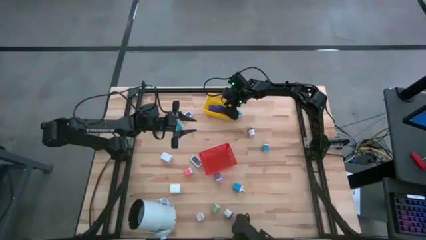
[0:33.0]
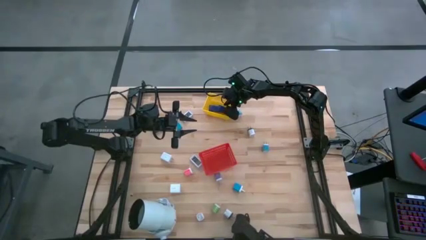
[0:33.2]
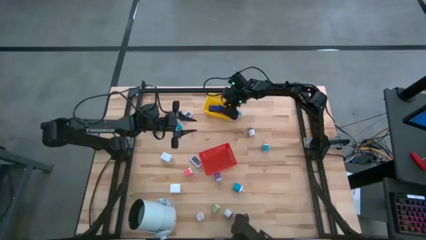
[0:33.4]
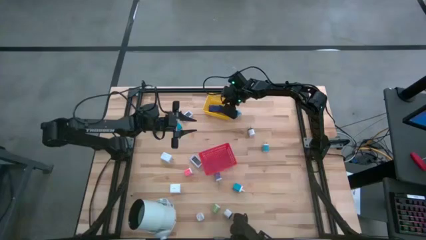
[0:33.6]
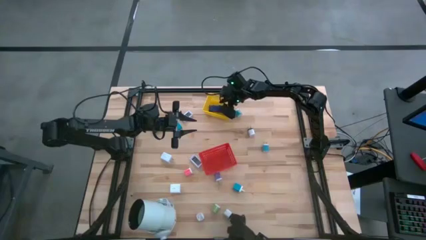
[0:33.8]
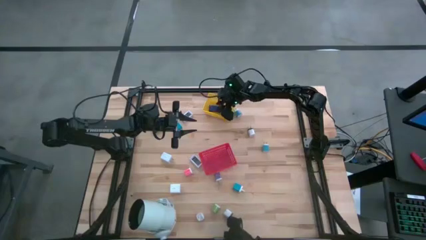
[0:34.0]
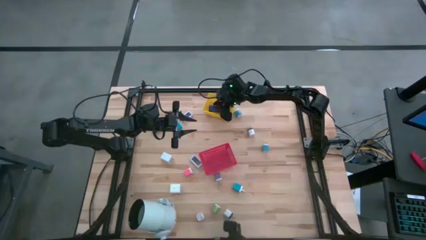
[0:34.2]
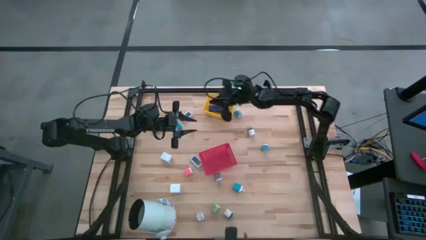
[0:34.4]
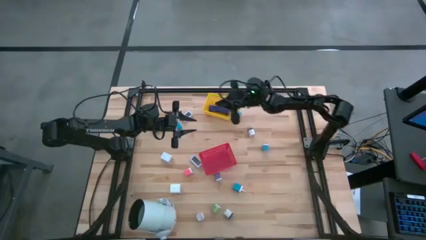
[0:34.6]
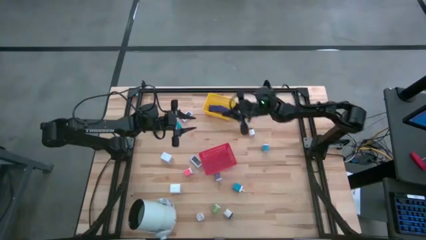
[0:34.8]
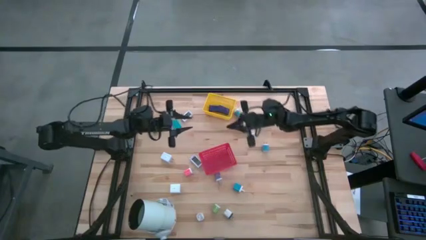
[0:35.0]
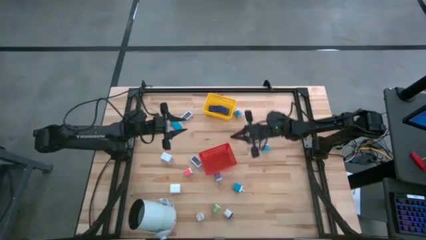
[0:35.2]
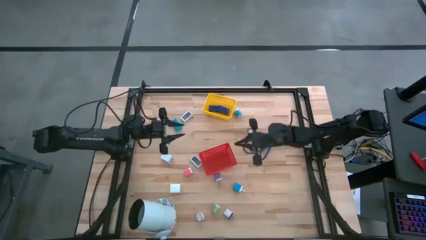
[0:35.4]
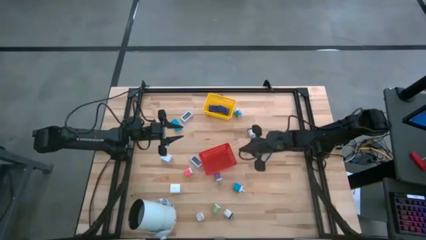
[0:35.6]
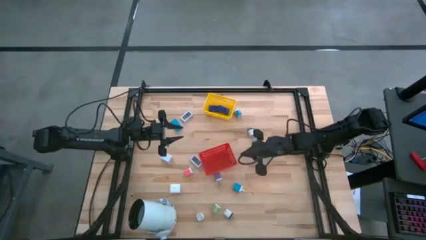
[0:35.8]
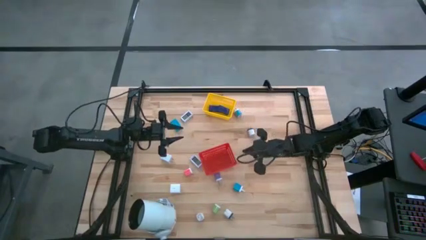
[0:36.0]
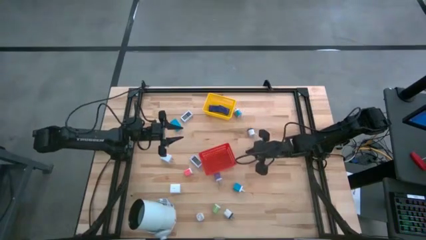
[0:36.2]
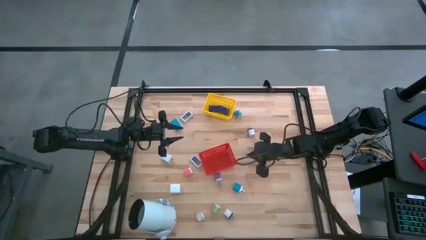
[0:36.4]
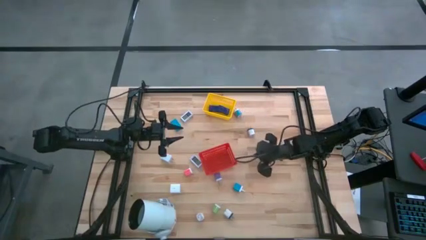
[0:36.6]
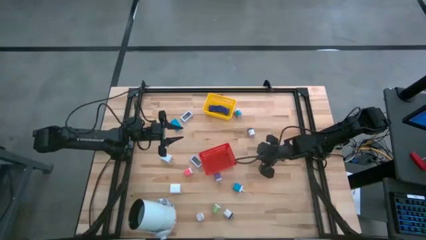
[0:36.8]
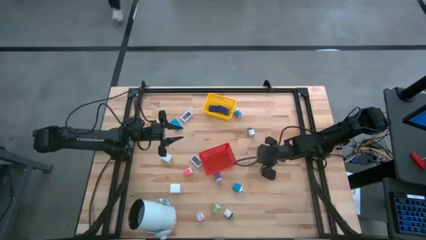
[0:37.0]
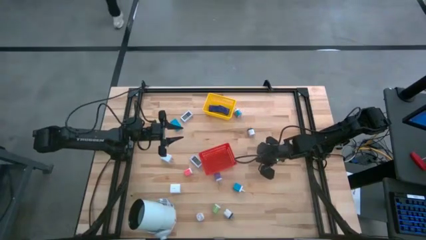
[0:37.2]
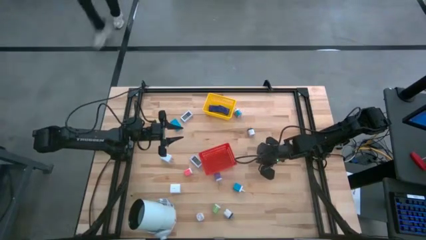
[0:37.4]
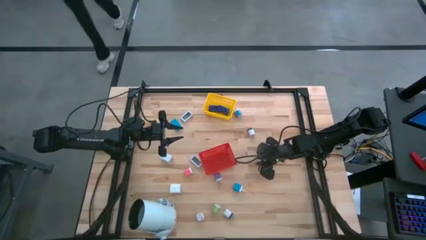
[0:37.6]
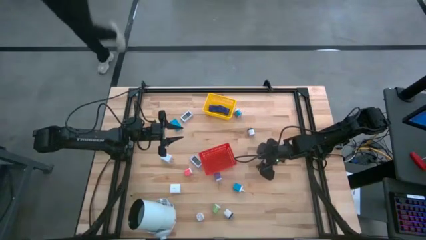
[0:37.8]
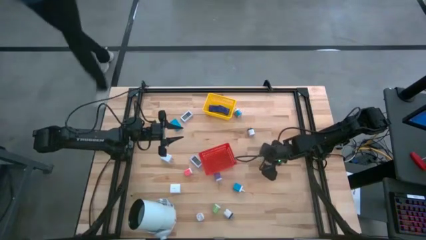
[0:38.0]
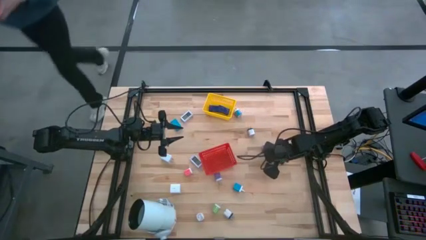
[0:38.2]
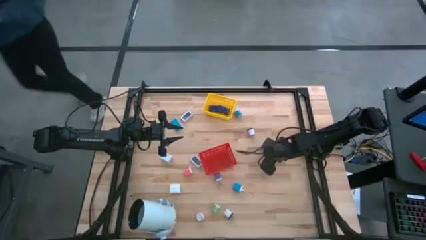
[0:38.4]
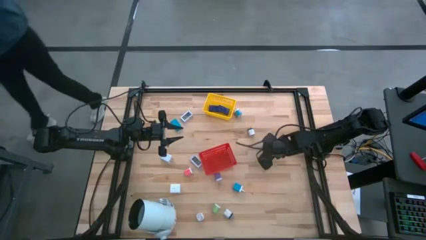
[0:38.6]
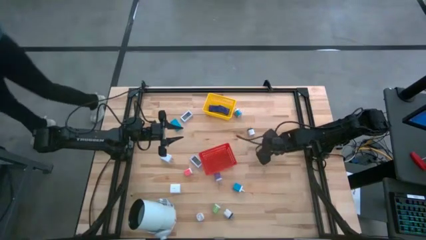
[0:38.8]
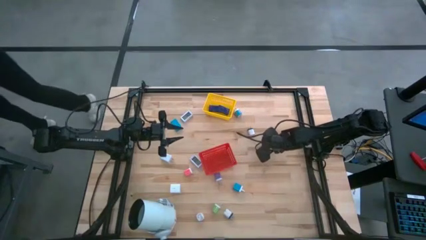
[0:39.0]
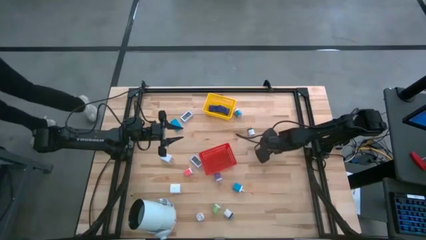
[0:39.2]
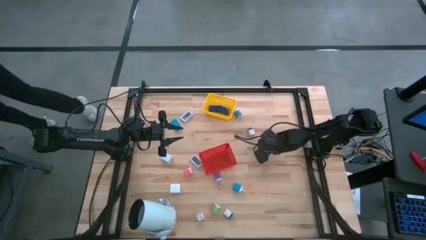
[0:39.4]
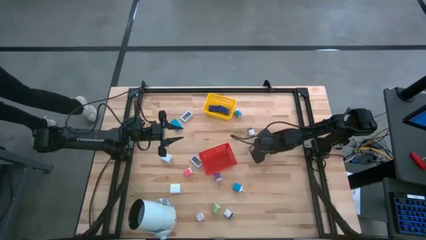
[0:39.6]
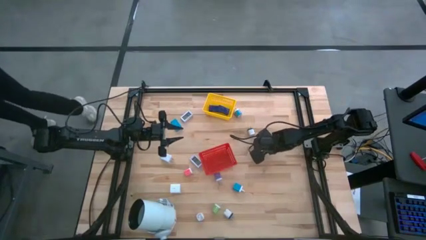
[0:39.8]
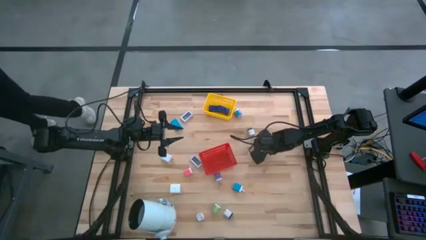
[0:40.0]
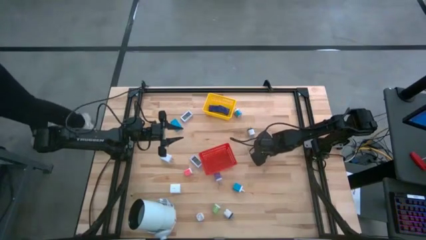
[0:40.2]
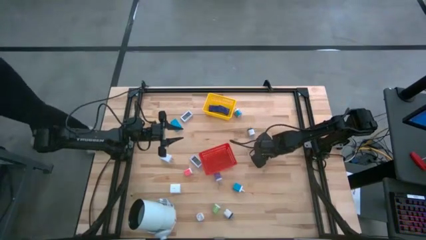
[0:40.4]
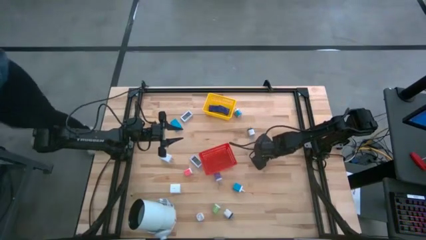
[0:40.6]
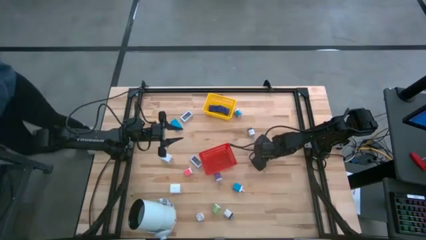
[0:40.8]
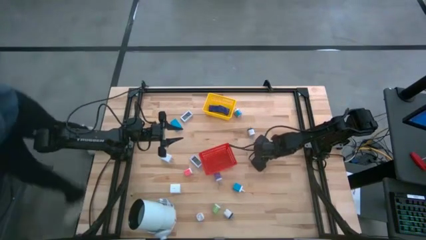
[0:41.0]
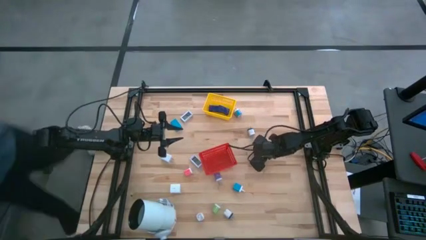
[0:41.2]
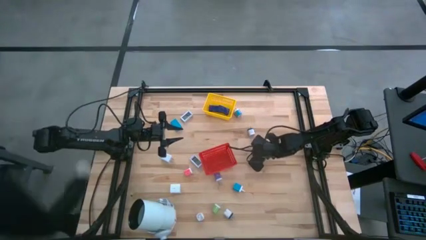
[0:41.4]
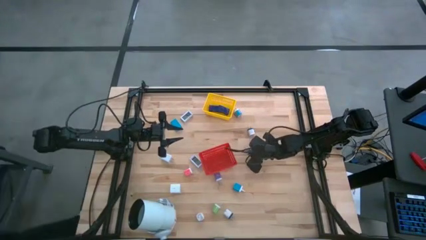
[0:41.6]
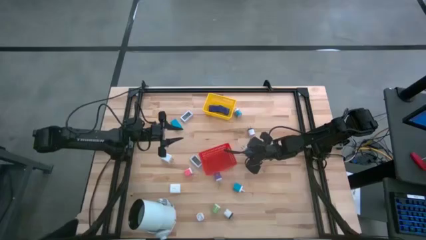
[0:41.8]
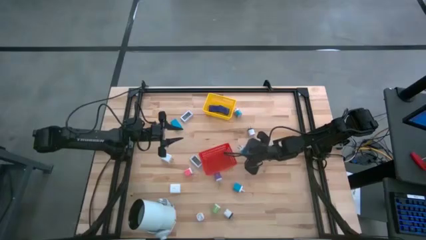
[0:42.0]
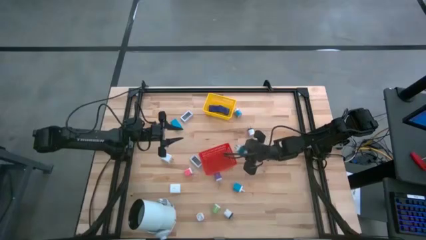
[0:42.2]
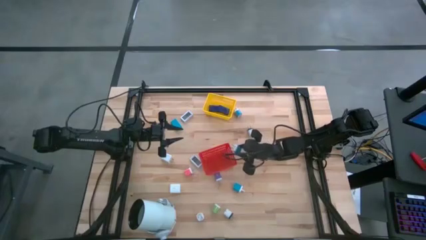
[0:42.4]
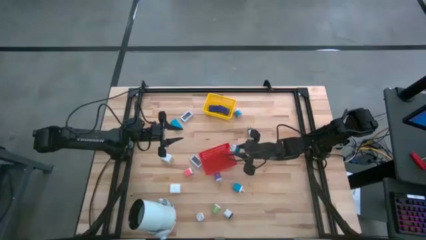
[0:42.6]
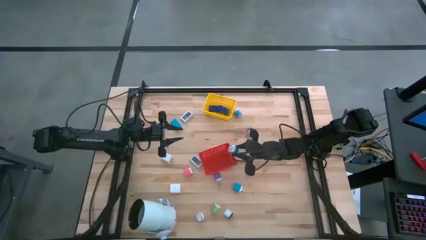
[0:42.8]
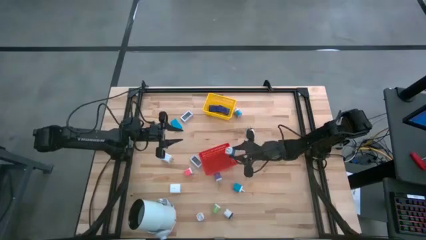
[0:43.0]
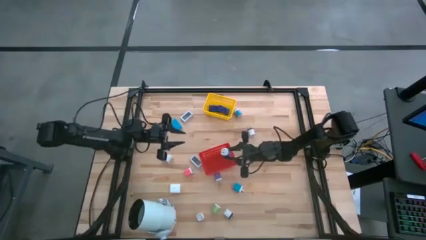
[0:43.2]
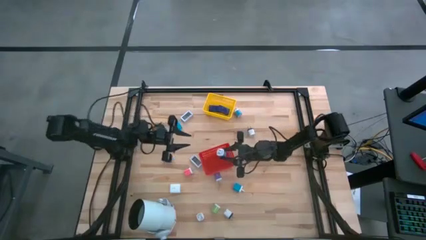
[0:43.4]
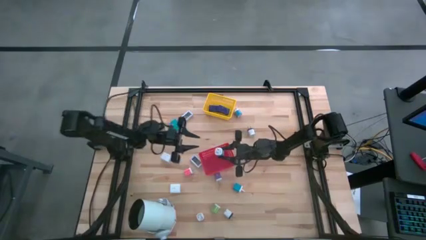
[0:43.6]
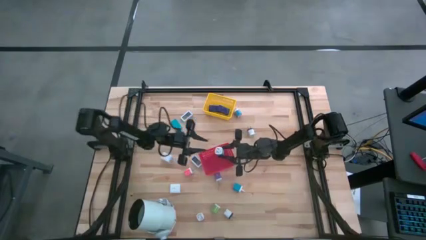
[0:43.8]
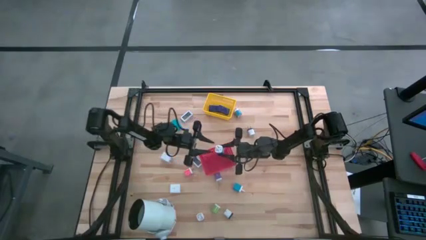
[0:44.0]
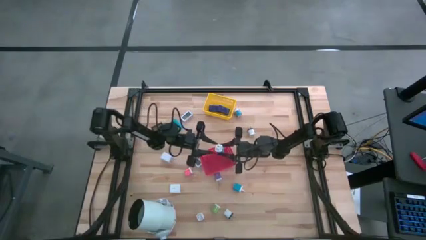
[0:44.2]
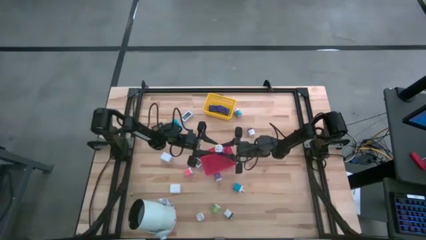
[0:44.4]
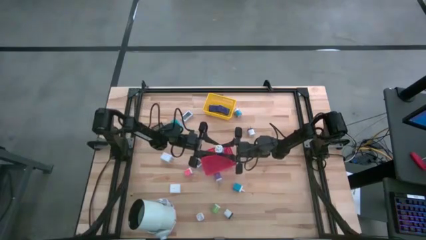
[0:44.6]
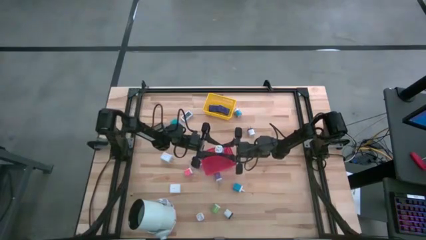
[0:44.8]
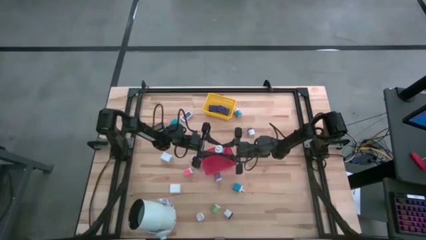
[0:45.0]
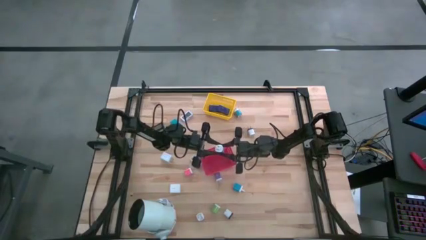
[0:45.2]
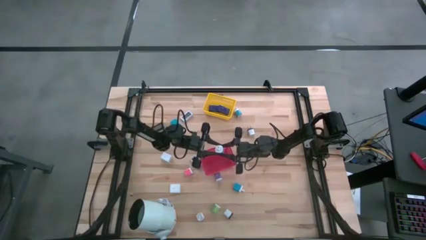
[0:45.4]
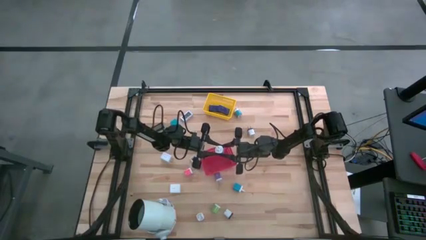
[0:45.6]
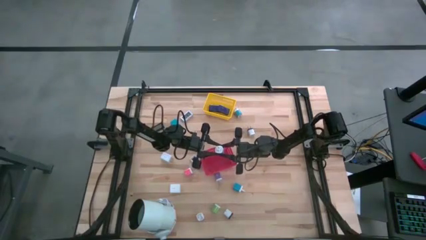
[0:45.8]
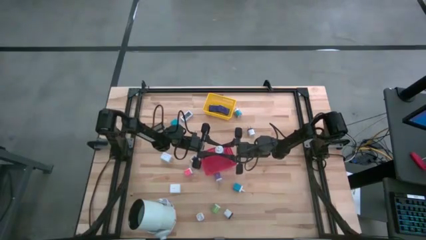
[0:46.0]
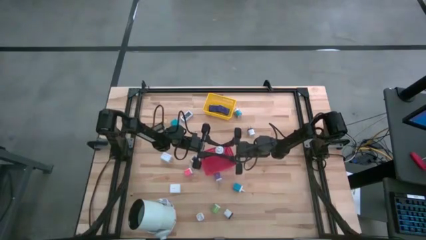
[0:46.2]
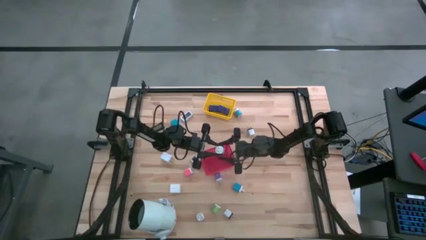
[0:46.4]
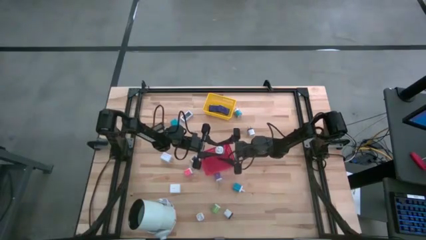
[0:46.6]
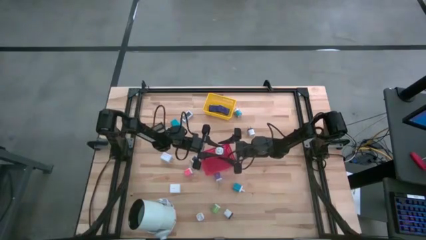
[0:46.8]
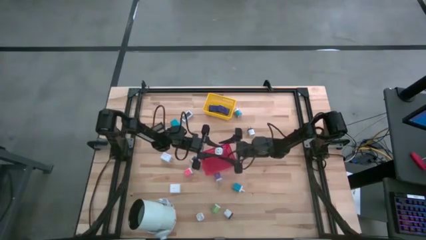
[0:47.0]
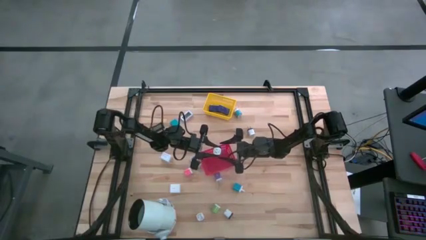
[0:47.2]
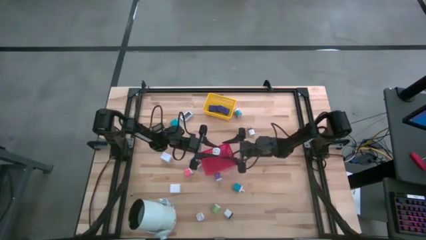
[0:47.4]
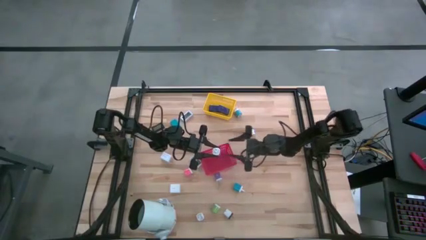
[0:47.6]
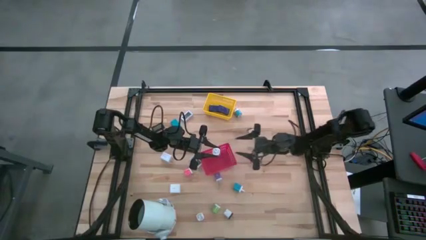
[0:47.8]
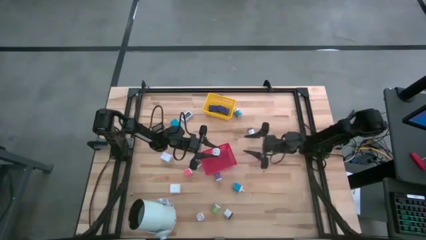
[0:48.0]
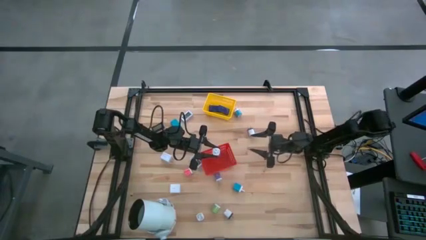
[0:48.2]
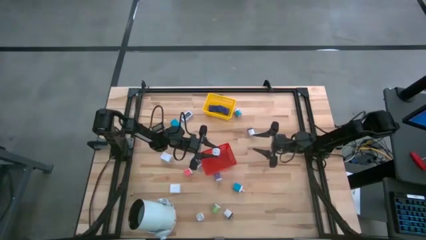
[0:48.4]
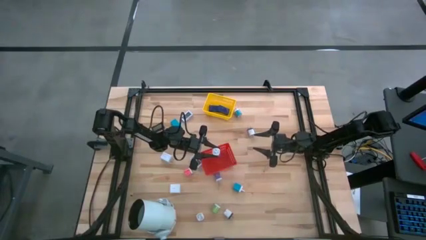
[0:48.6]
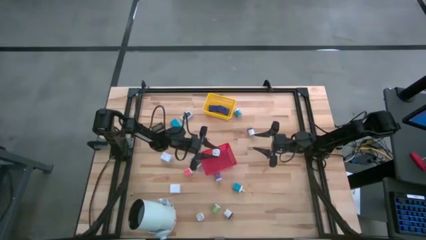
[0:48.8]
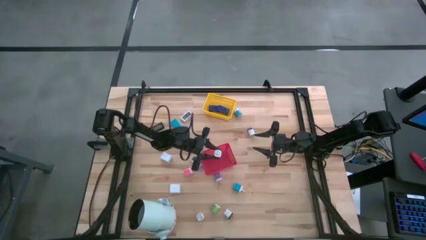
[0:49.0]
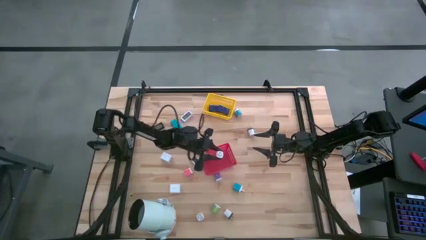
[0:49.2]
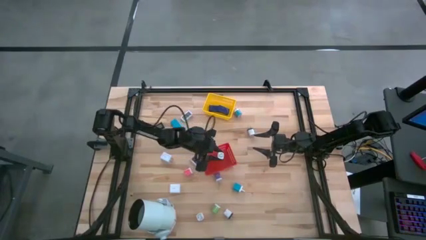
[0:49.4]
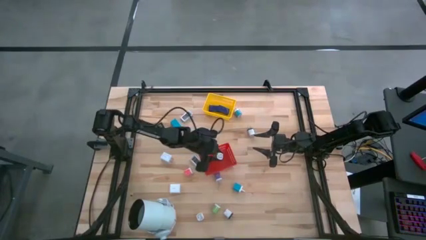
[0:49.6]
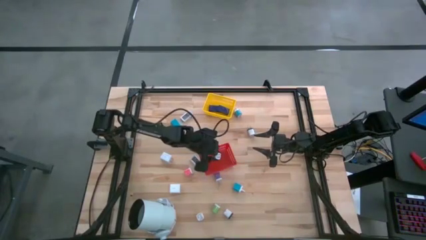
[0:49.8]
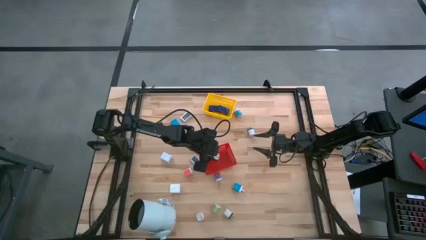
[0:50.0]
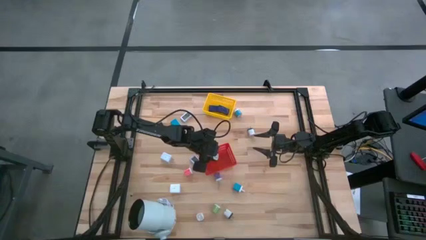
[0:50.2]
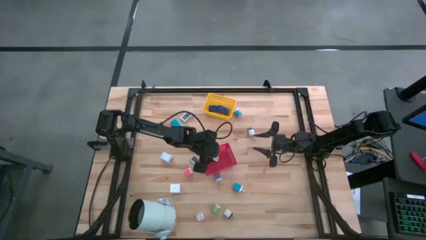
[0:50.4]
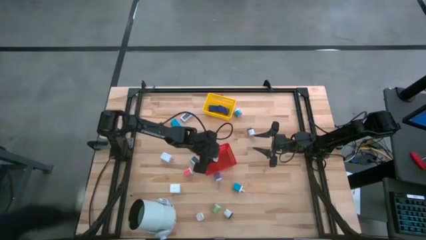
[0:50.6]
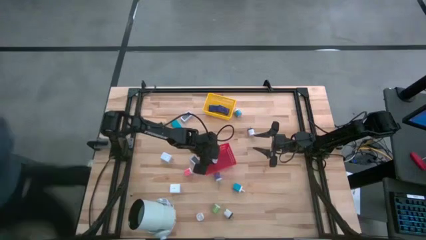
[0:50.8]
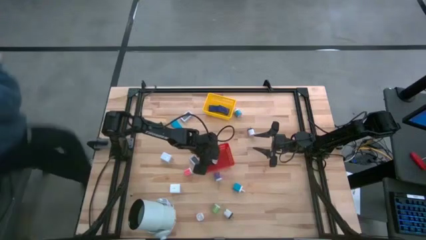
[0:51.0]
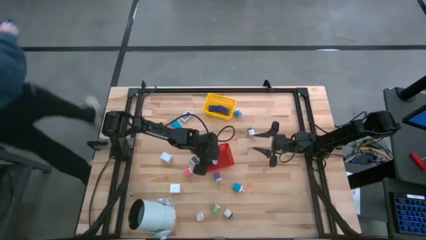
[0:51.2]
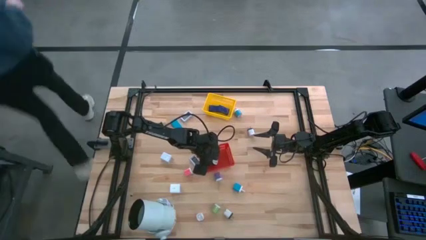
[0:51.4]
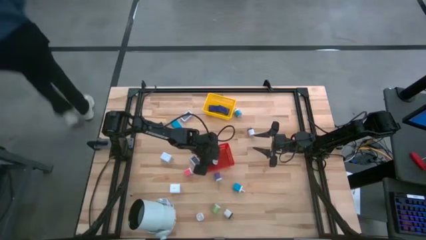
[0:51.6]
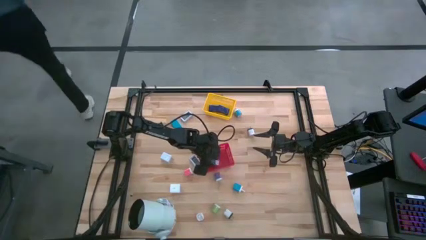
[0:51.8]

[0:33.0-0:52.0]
Task: Pick & Place Office items
Put the middle blue and white charger adapter into the red bin
